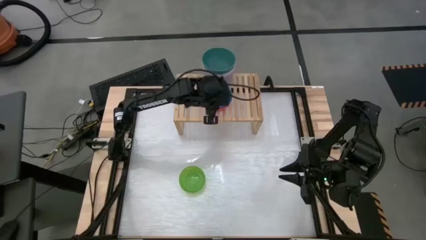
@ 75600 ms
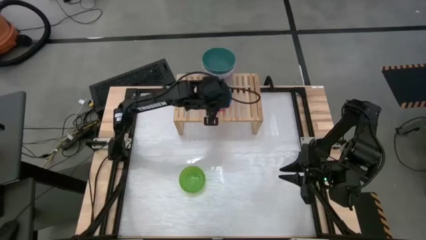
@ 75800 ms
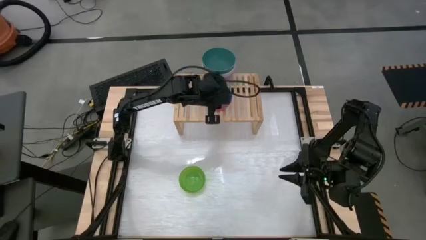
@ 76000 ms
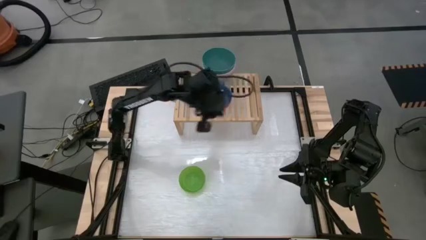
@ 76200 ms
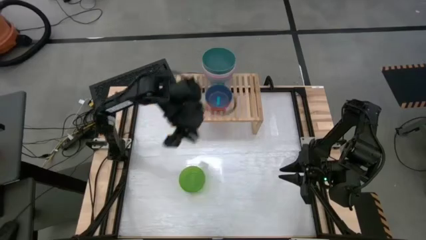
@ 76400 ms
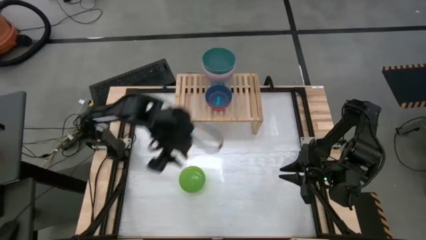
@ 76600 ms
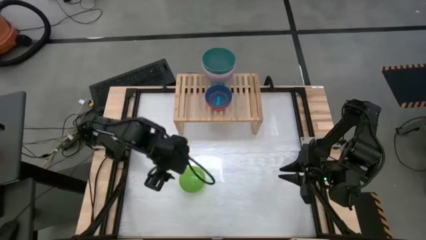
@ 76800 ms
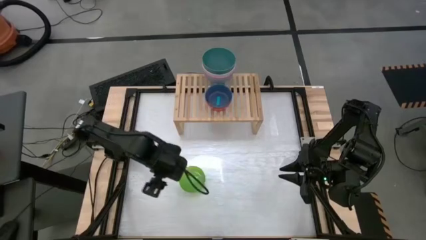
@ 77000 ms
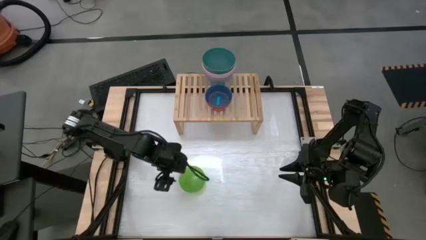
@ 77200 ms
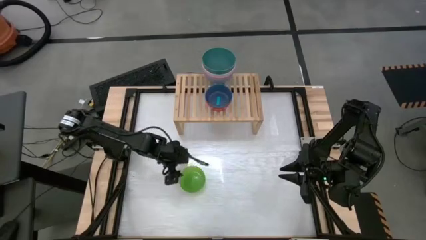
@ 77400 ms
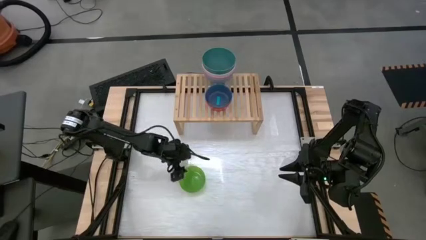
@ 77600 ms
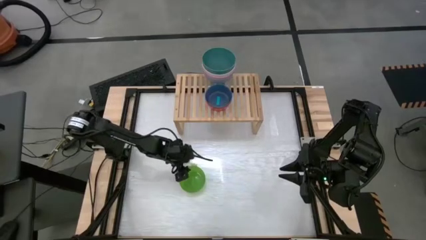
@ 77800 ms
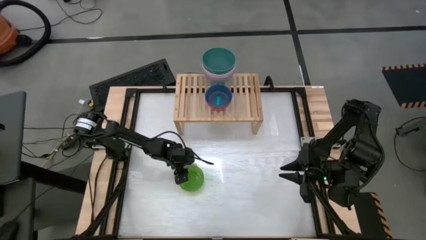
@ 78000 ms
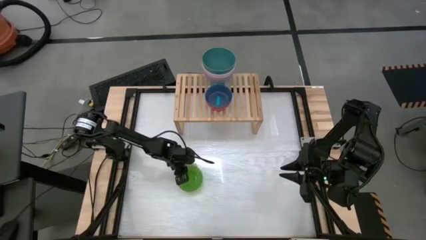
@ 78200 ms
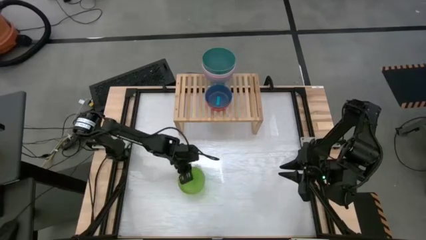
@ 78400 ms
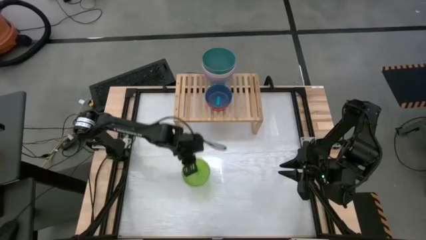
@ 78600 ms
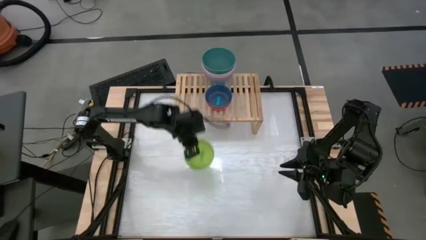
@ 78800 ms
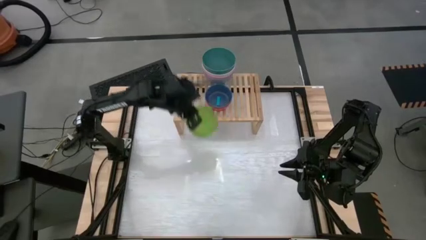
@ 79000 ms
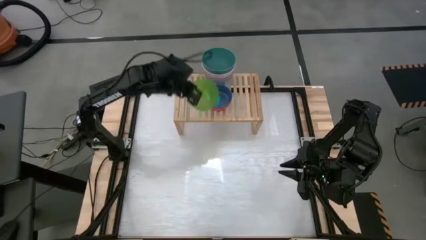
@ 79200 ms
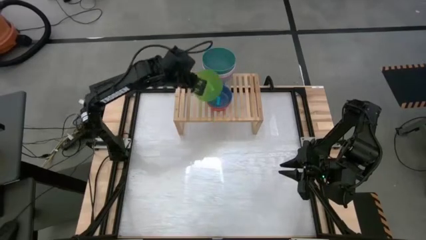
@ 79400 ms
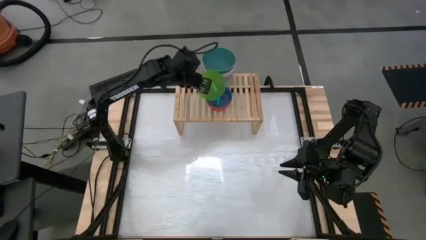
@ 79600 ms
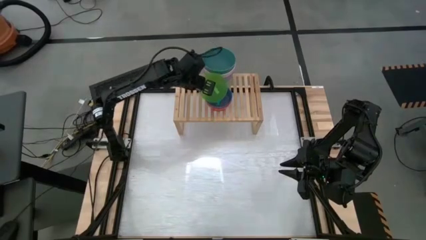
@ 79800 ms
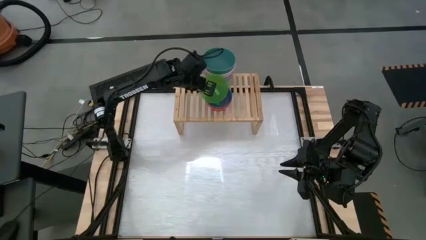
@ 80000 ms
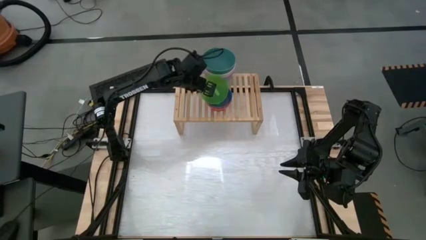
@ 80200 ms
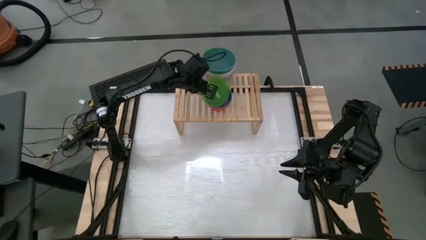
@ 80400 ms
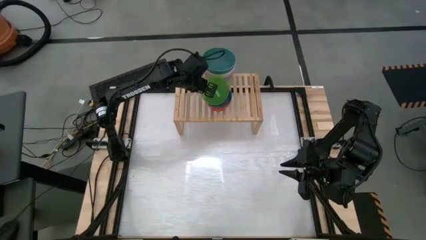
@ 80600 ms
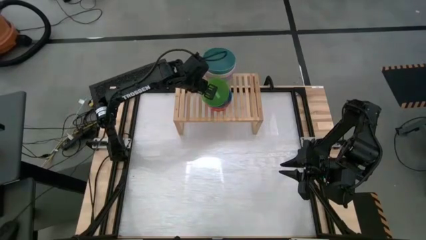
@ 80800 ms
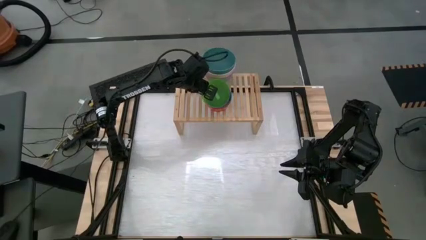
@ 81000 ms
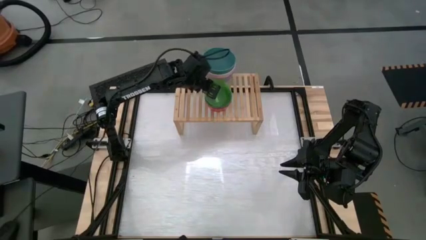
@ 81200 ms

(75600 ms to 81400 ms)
Task: Place and stack bowls onto a shelf
Stack the green bowl on top of the blue bowl on the shelf

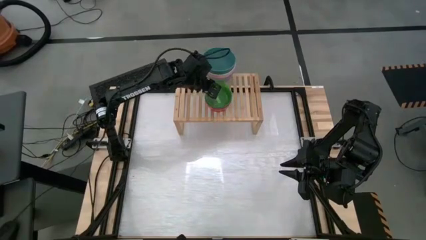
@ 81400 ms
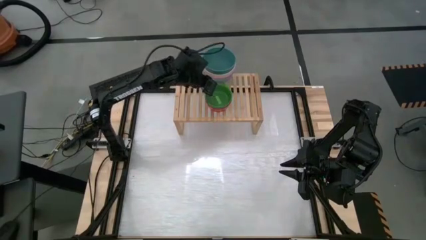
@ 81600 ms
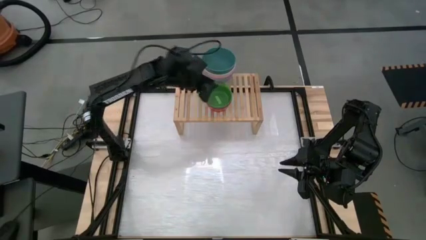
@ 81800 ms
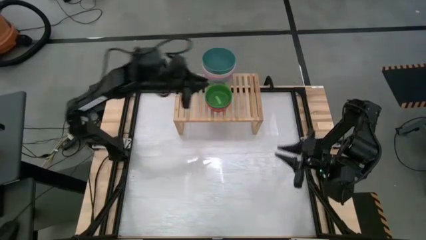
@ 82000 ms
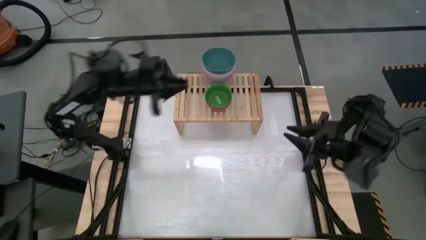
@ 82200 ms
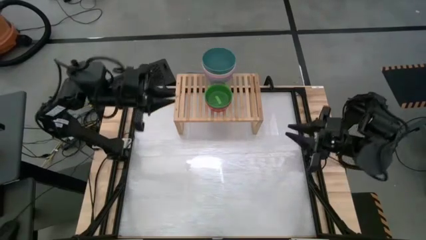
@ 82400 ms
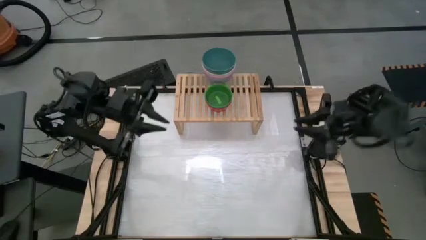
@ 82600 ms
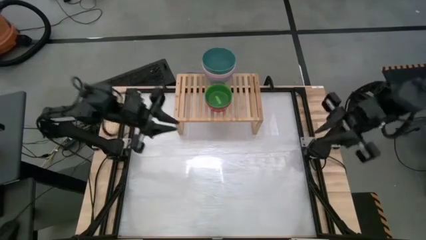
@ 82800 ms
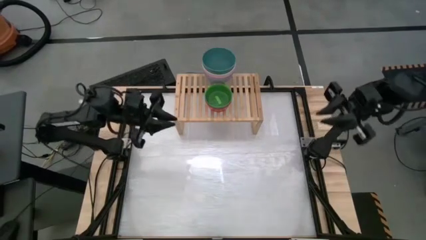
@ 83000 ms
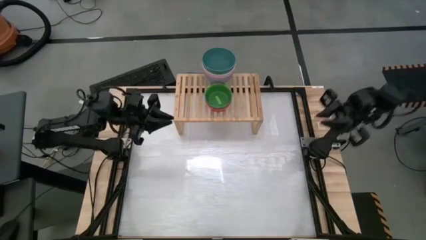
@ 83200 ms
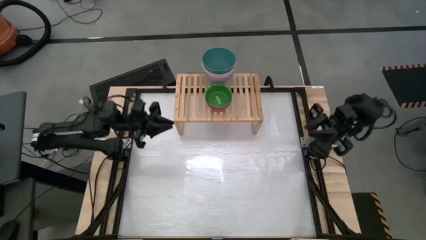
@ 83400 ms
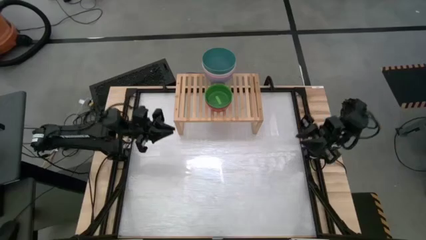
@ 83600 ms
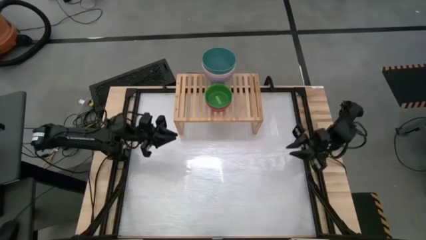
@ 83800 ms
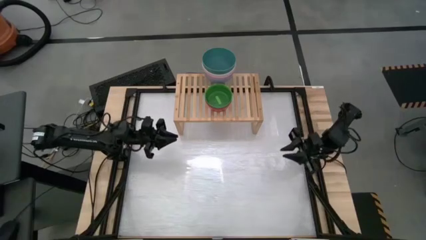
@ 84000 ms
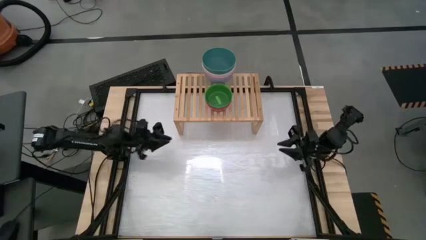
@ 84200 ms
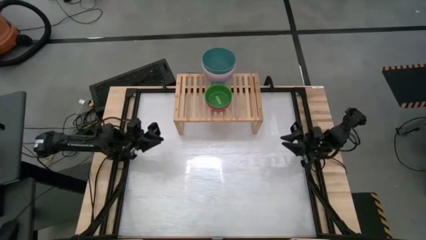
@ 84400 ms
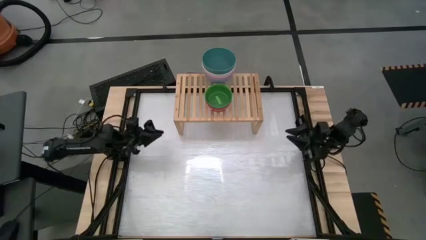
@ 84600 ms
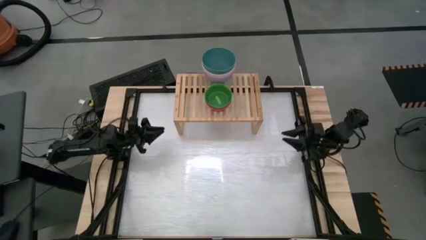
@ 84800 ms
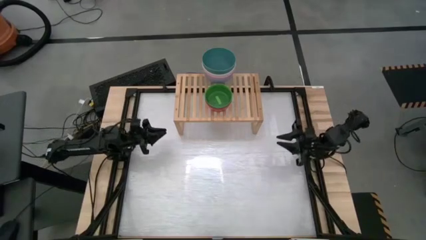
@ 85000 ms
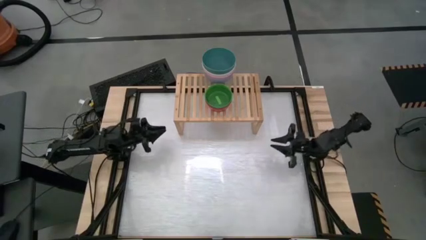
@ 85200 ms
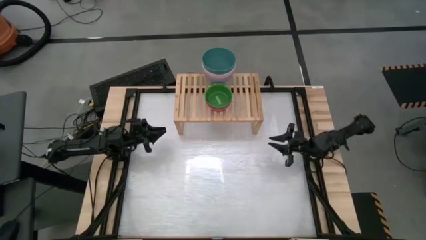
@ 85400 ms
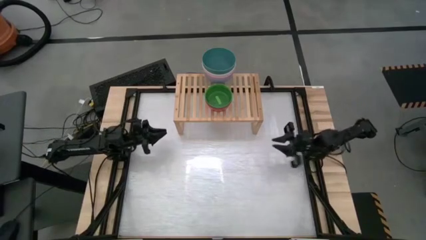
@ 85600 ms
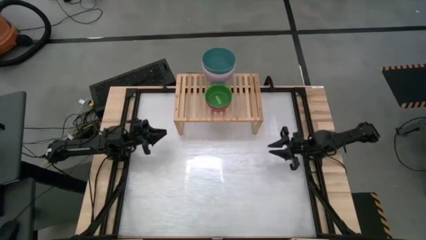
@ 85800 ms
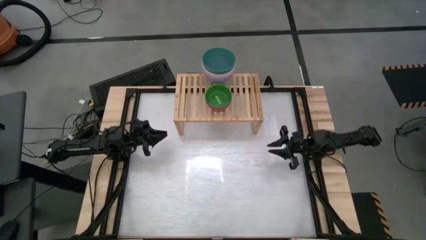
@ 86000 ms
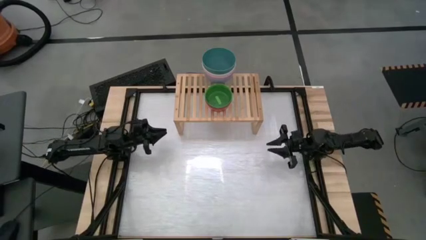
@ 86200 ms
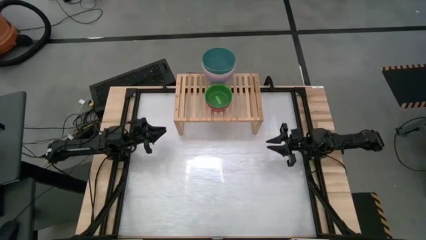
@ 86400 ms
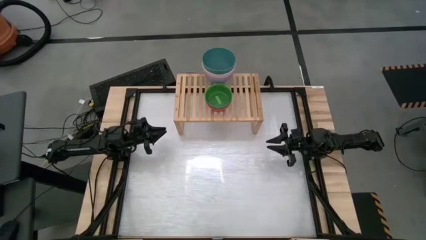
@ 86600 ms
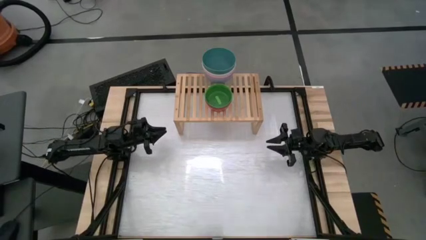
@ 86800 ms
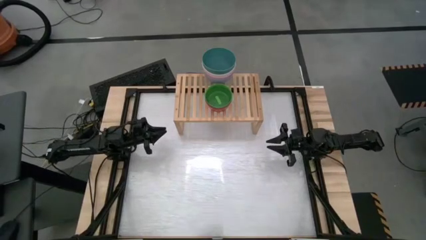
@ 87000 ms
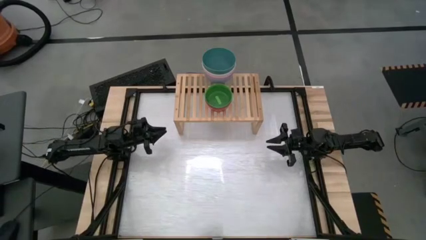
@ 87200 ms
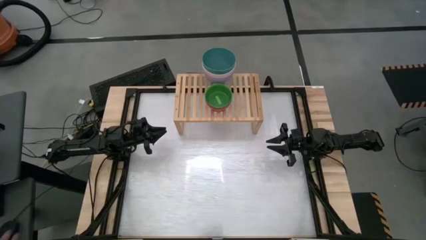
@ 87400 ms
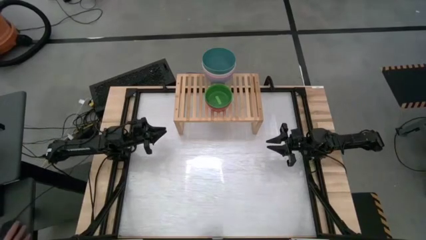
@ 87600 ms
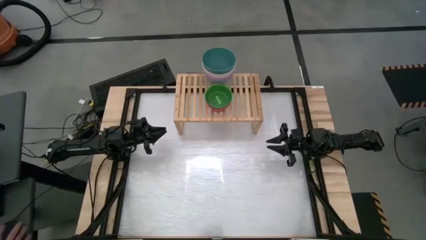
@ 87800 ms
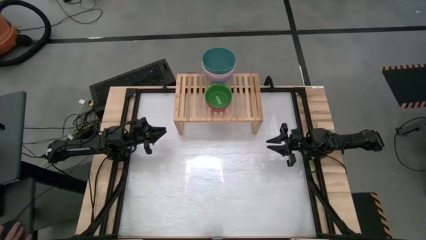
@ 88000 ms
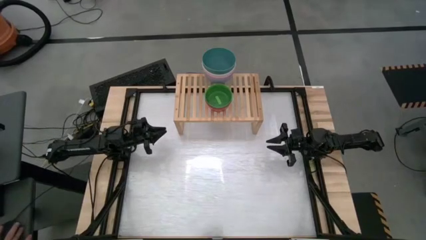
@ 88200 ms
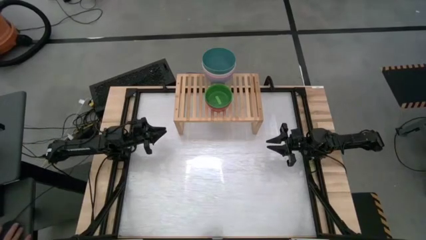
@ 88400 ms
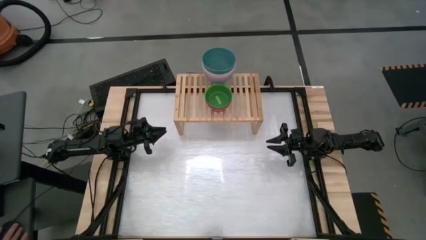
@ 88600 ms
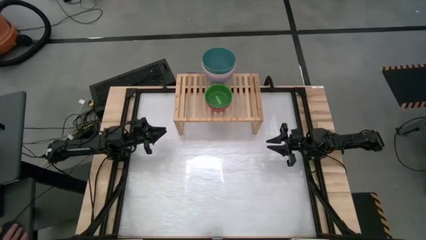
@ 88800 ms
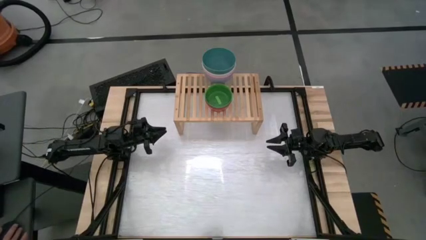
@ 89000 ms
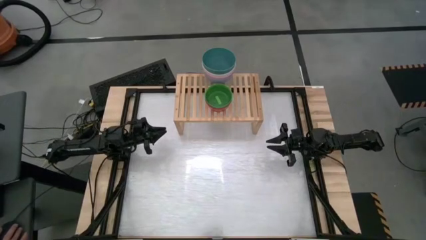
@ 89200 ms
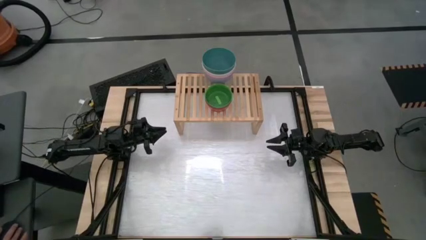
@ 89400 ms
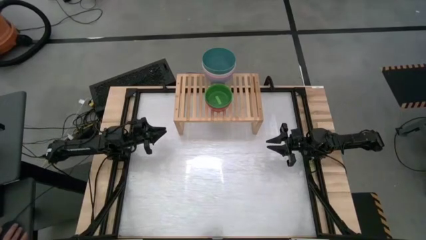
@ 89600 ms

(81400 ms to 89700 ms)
Return to Home Position
